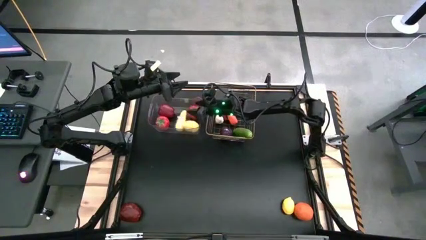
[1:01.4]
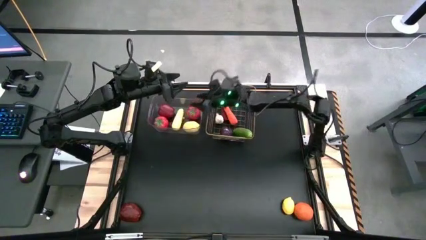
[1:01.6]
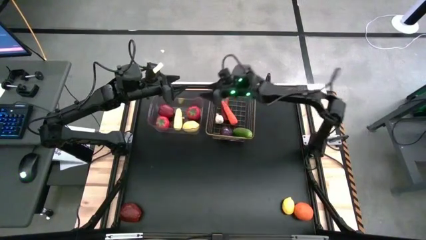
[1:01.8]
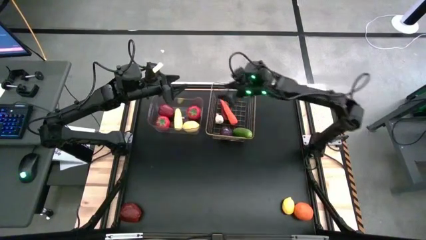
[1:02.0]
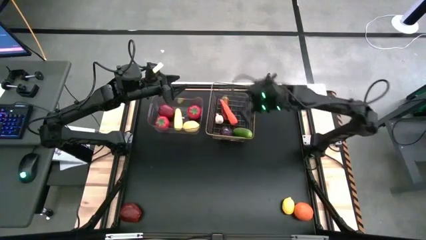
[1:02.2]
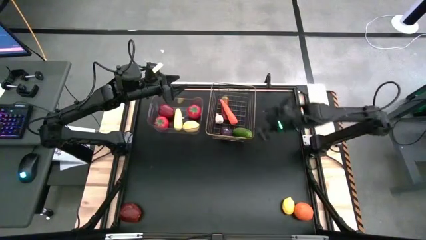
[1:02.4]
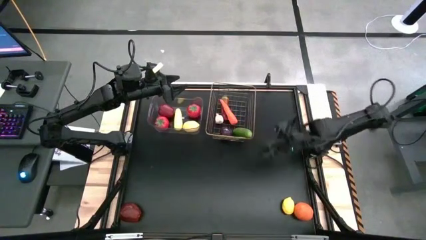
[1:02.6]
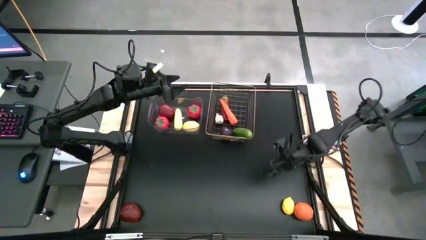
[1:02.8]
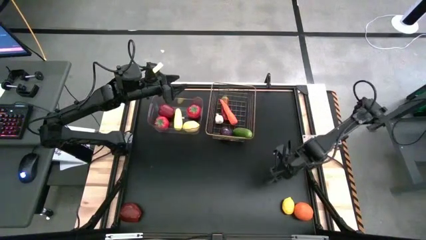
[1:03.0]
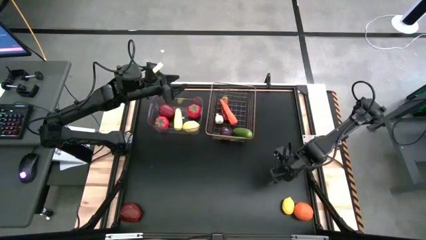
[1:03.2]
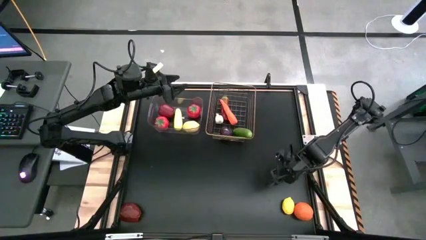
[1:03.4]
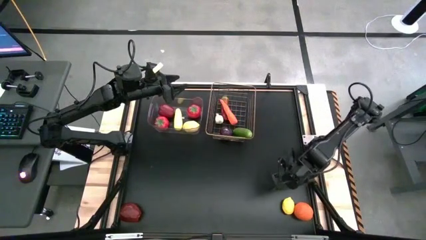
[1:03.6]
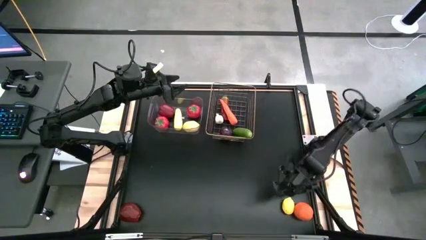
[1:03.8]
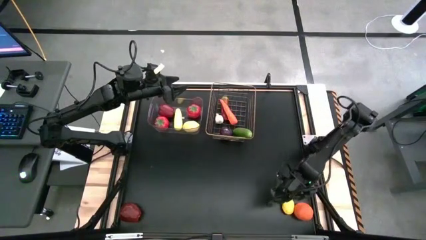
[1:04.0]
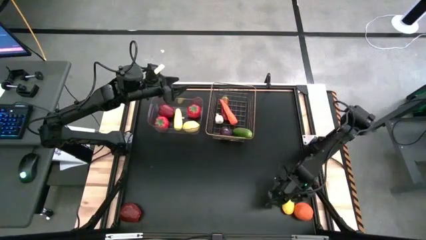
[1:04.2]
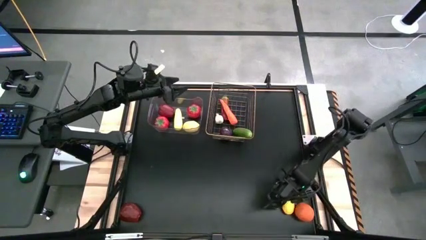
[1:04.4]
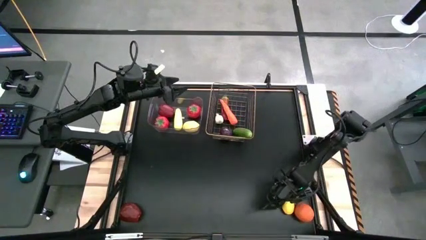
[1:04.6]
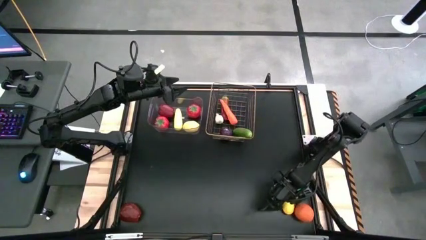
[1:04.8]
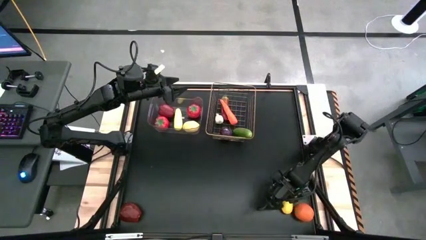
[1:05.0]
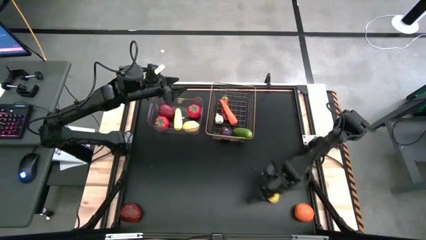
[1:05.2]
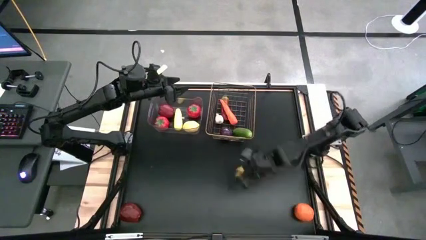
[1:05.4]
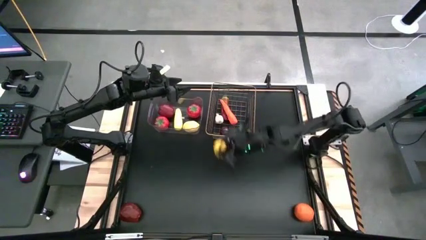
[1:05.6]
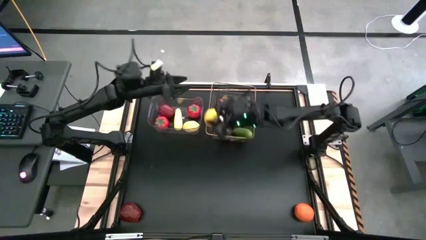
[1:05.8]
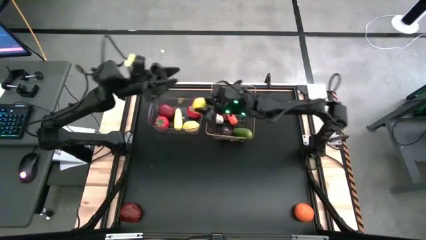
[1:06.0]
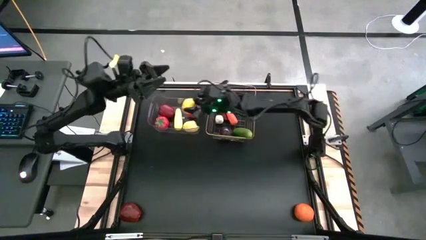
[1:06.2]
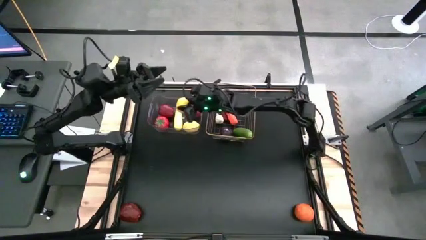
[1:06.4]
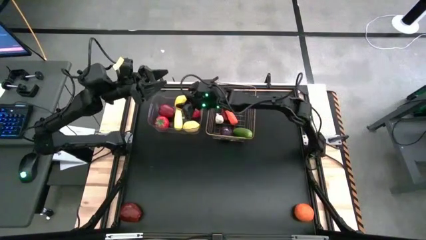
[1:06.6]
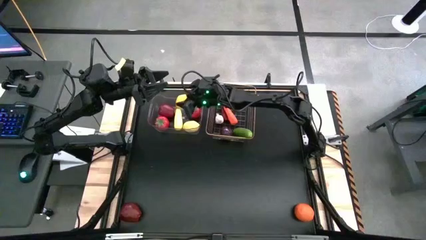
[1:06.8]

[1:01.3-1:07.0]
Task: Sort produce into baskets
Put the lemon into the transparent bin

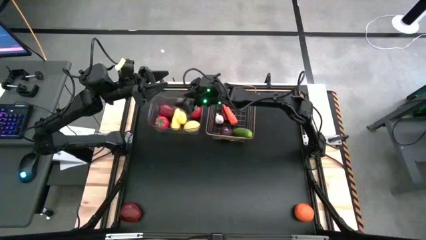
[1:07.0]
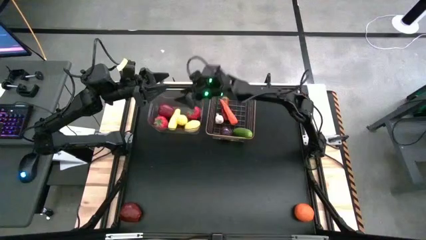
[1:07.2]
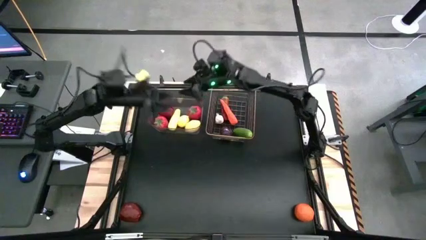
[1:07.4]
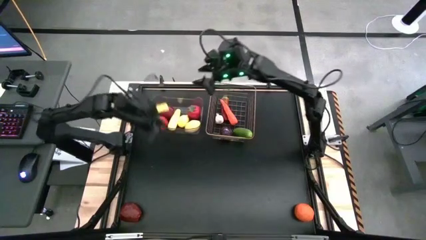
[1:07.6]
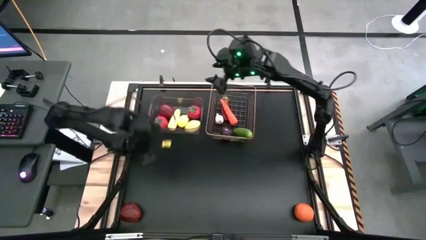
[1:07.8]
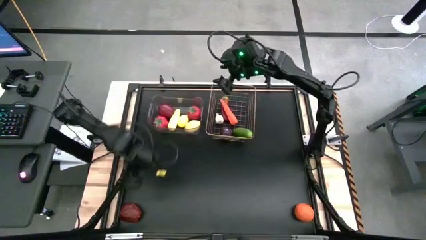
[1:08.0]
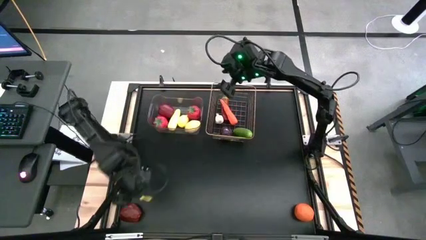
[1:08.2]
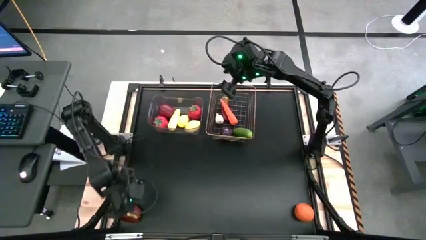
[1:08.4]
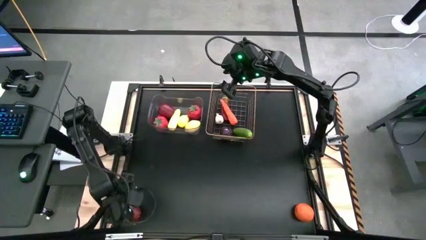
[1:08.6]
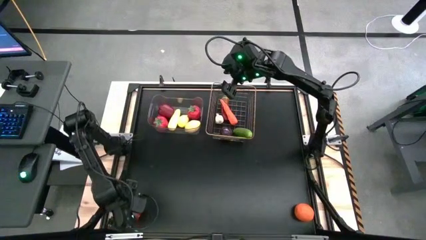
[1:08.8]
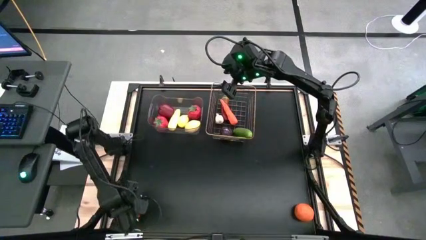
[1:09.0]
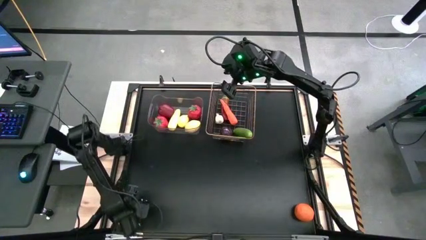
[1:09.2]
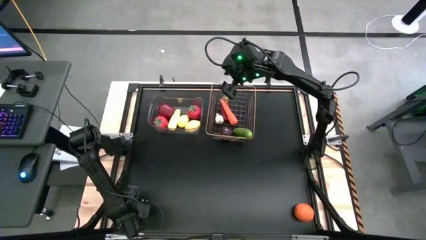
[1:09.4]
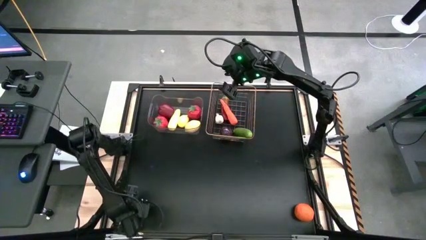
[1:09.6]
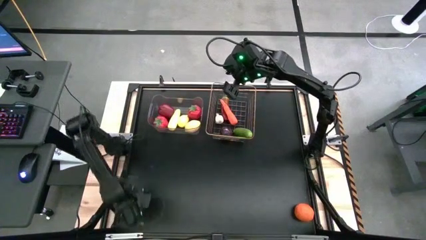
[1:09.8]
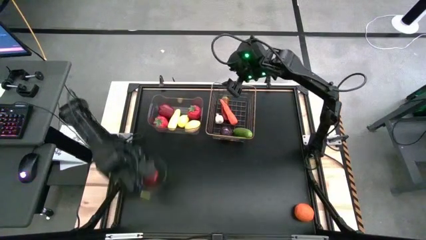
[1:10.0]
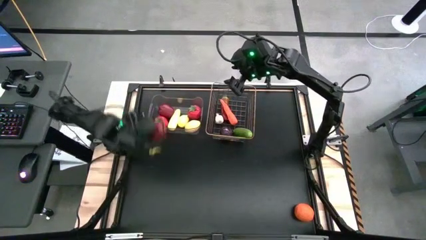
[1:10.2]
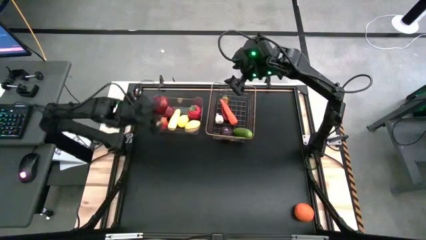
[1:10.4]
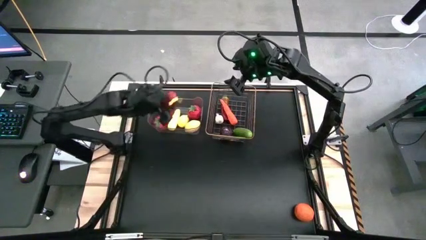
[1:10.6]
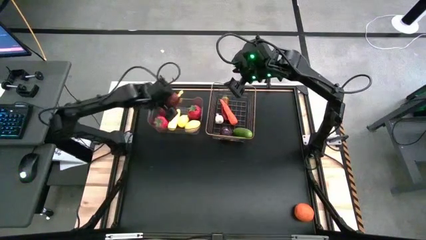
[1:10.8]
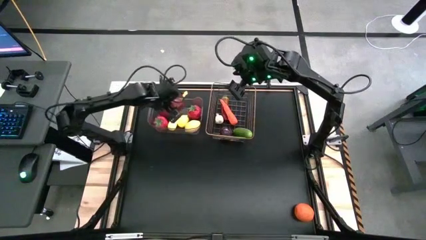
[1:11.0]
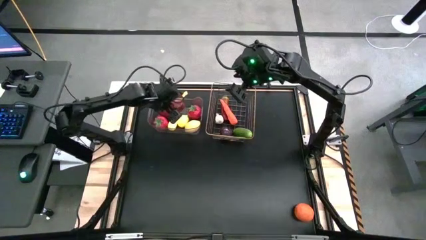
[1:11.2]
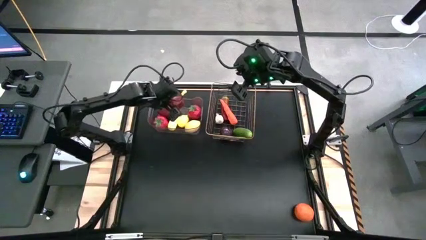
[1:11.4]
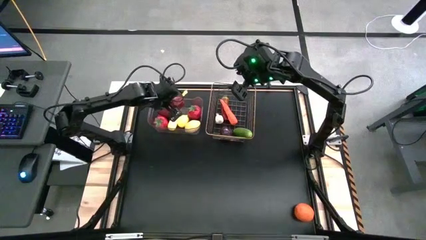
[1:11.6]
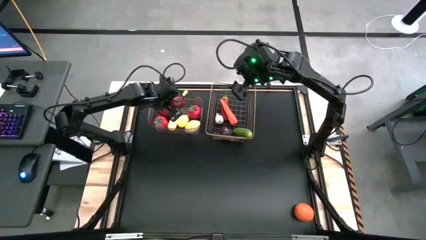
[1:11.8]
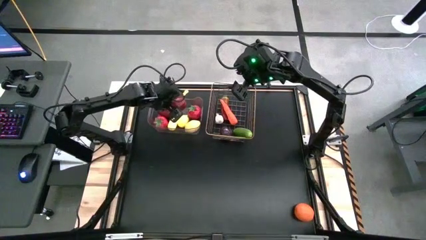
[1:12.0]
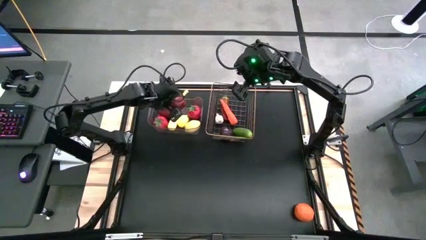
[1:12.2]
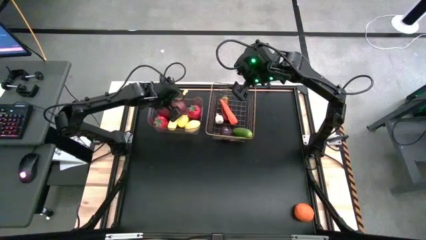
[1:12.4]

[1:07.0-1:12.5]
Put the apple into the transparent bin

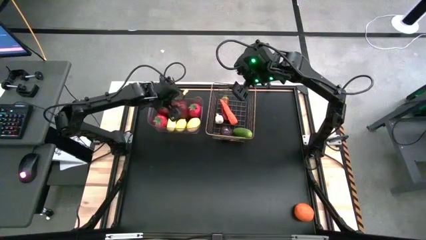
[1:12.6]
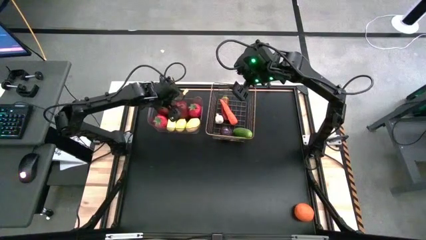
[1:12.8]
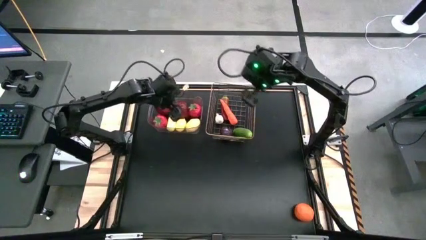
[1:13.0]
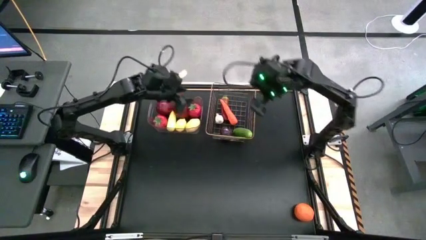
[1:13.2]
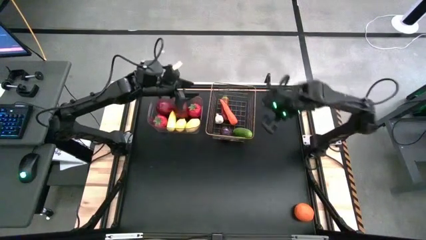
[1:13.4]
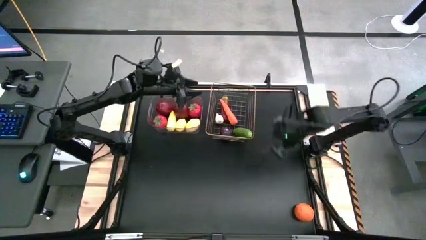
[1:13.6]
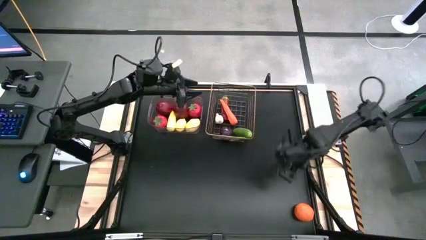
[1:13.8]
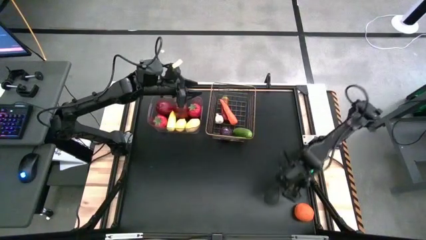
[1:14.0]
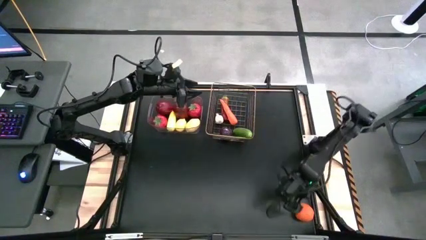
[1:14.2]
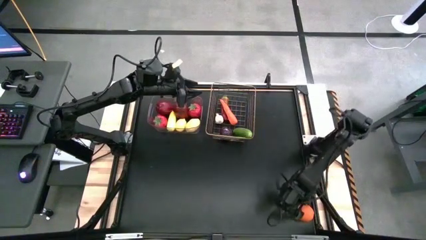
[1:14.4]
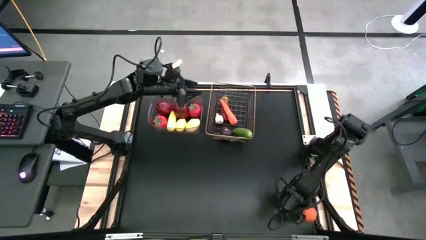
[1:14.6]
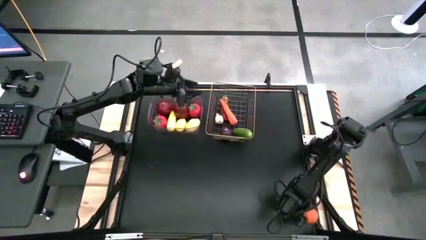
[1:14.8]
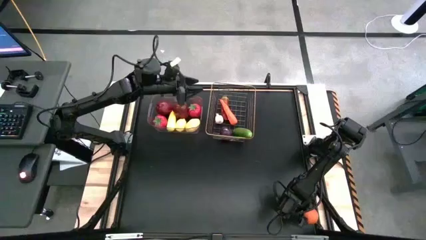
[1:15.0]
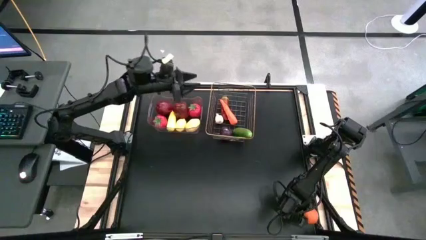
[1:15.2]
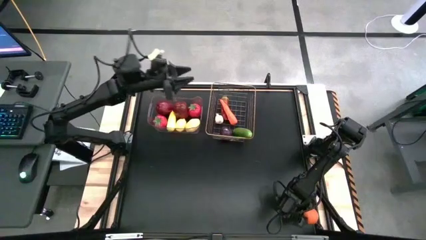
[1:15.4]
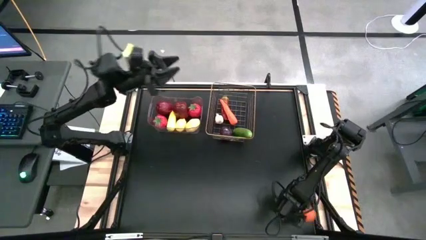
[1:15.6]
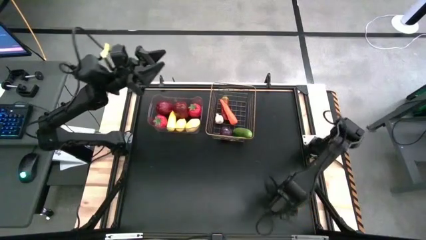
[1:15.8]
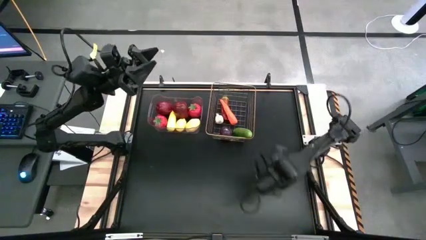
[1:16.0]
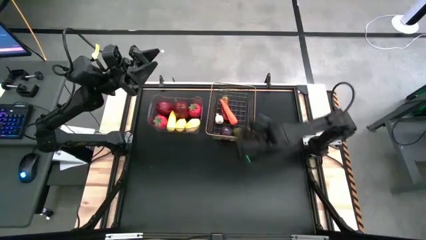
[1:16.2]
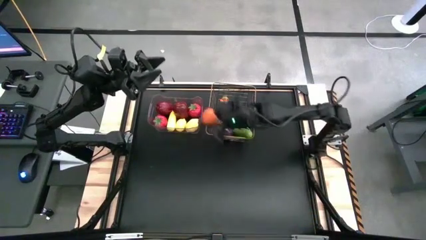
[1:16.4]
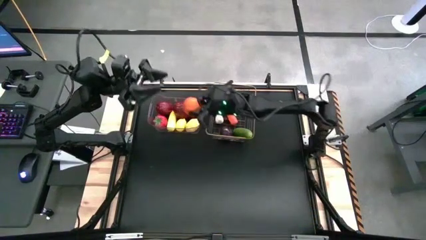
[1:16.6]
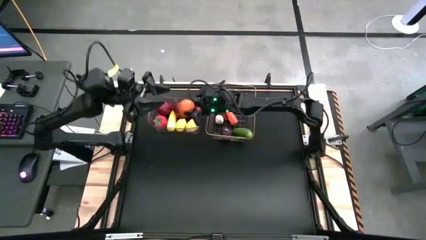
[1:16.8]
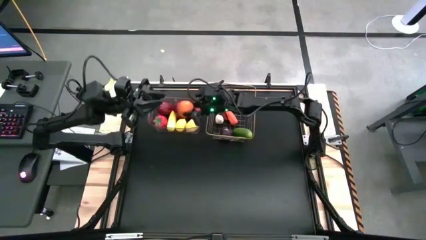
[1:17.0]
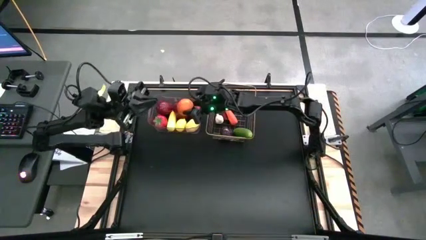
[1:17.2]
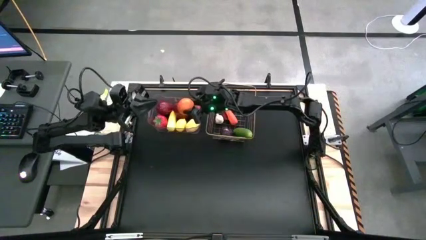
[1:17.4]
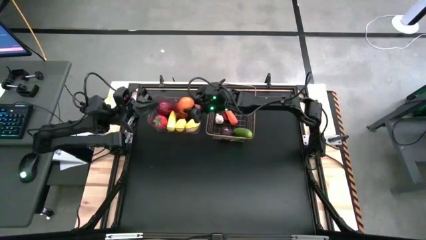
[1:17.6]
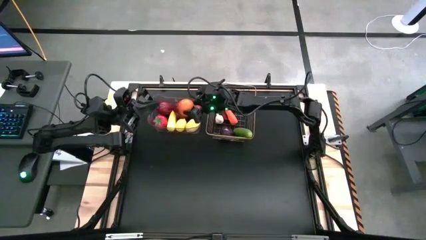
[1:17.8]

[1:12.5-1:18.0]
Put the orange into the transparent bin
